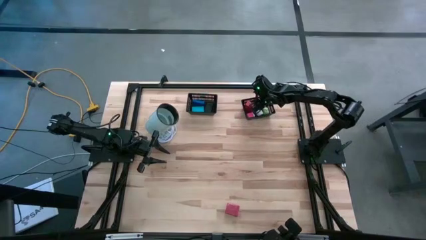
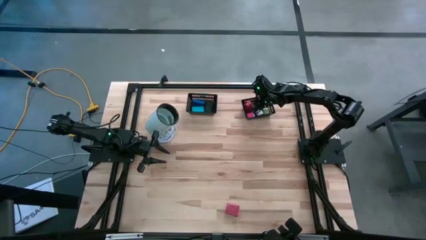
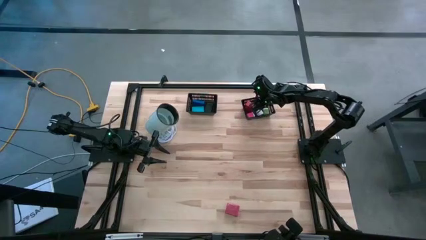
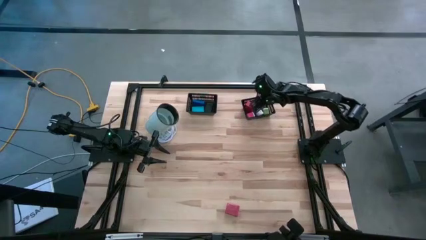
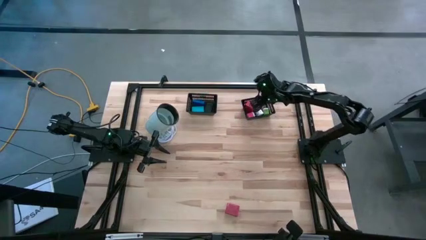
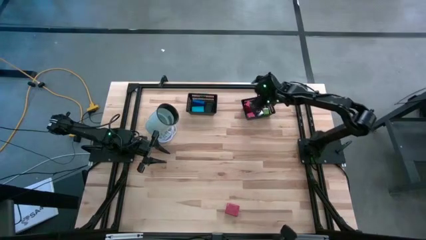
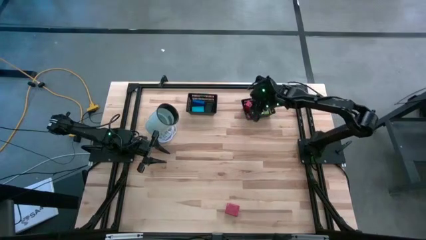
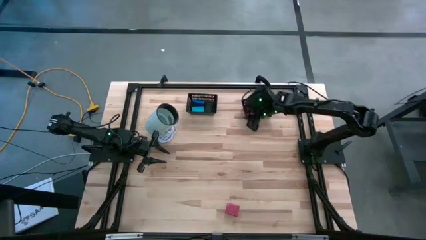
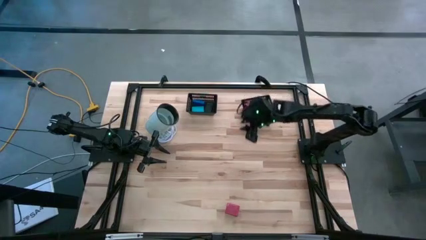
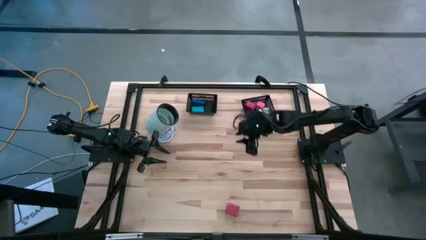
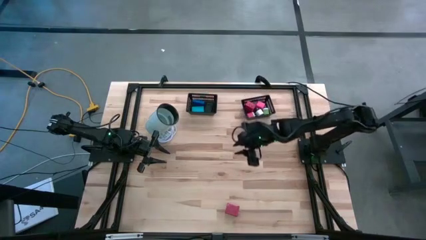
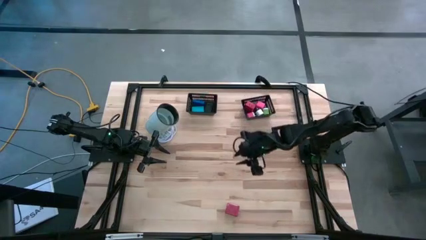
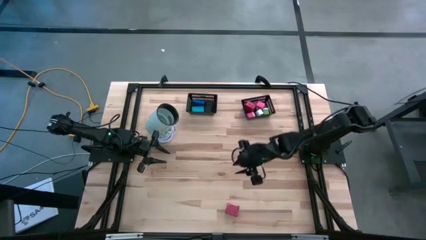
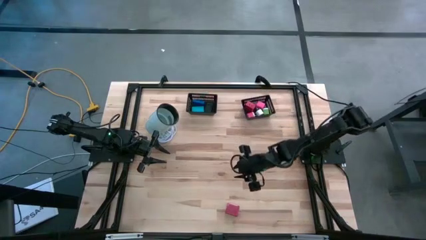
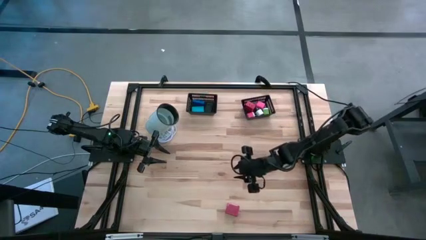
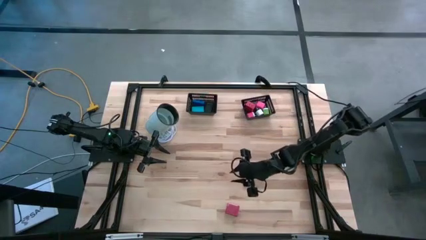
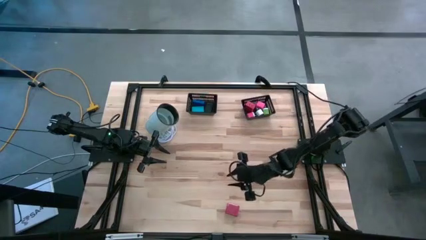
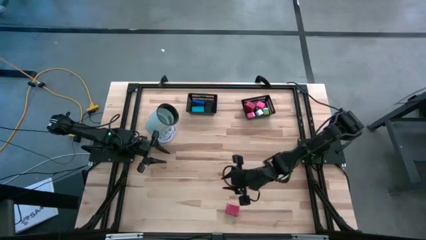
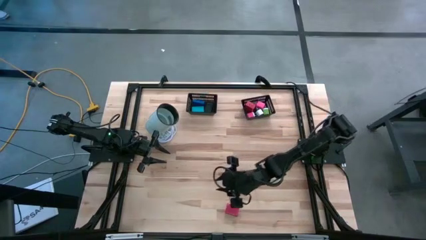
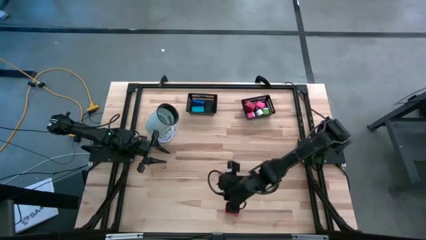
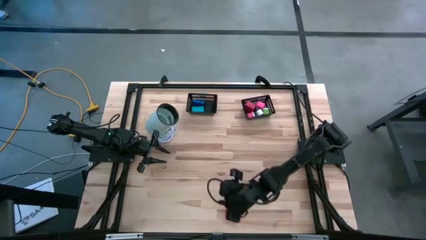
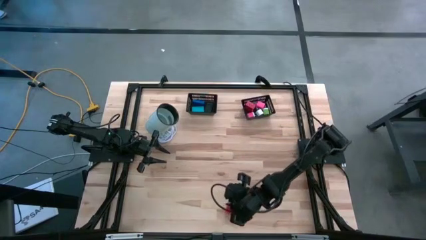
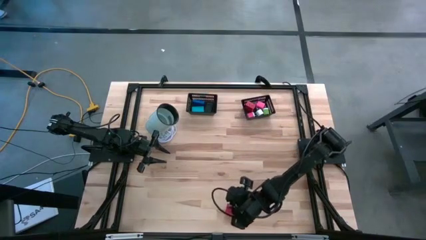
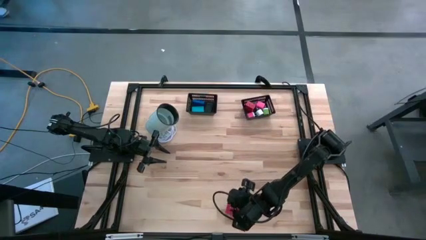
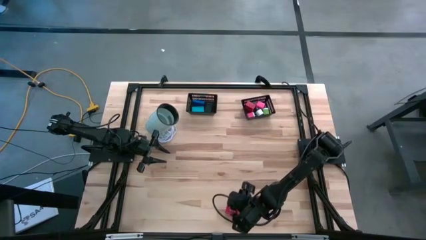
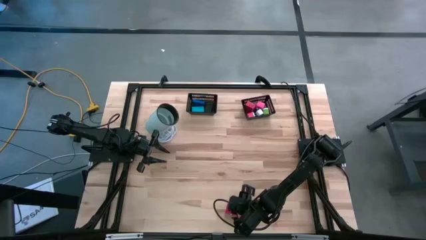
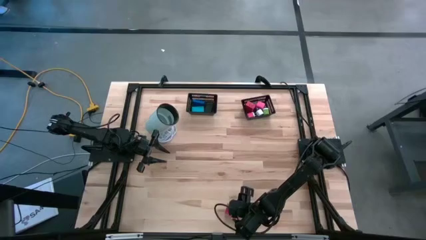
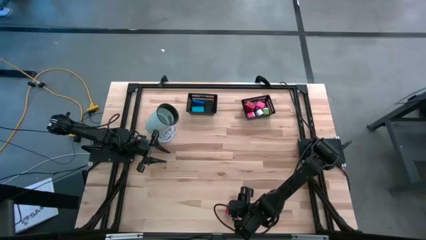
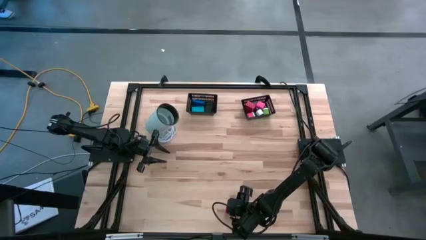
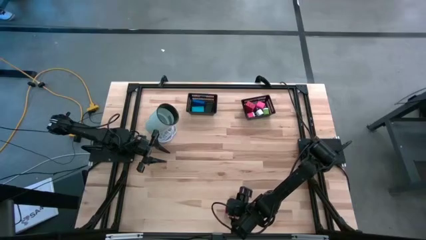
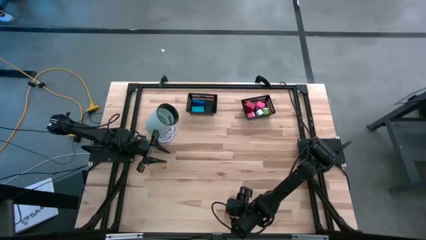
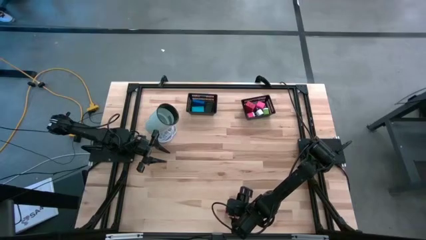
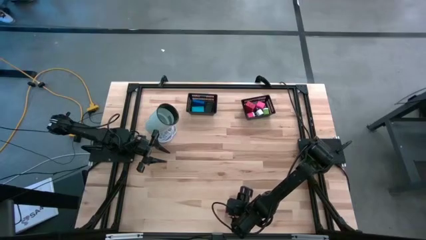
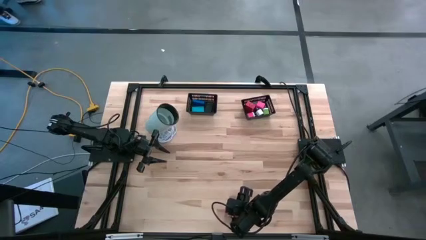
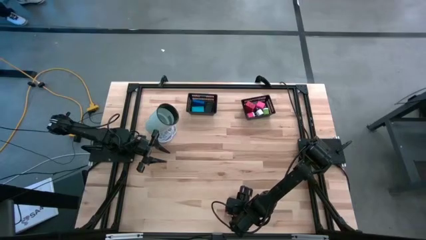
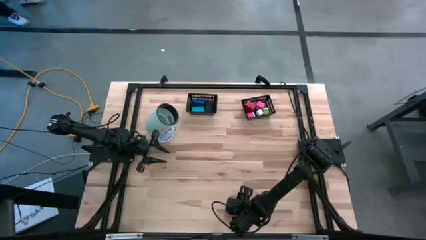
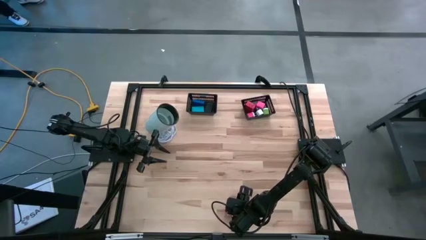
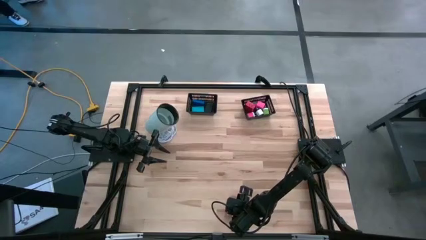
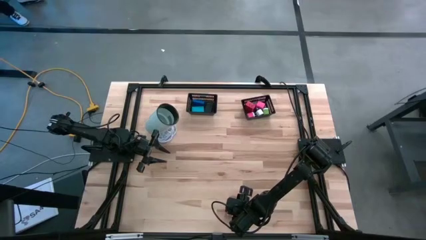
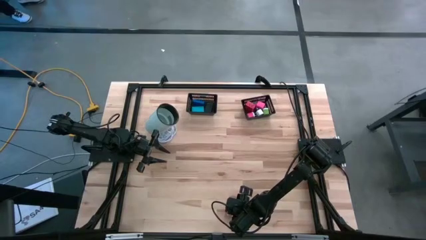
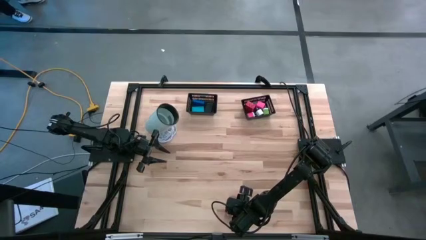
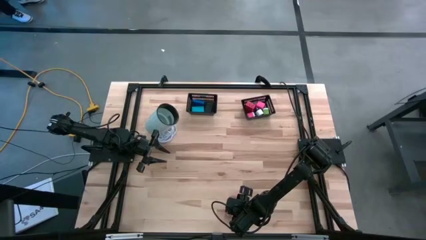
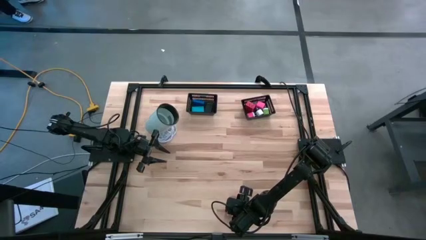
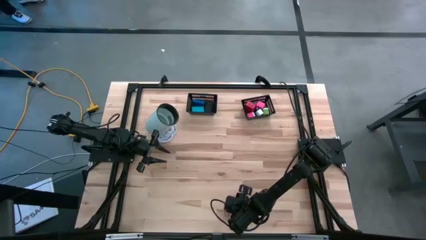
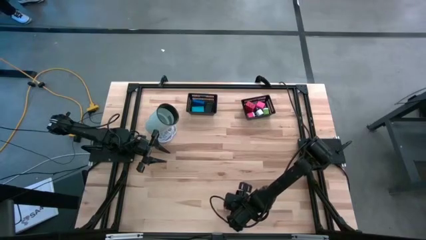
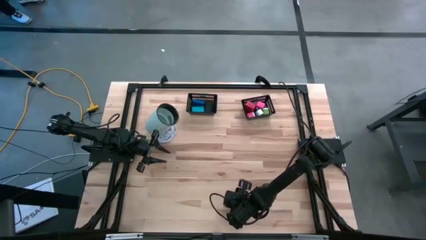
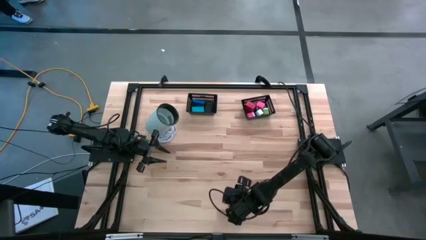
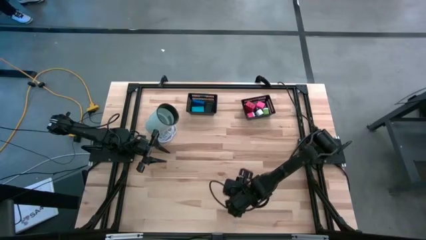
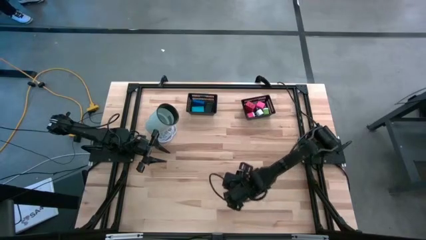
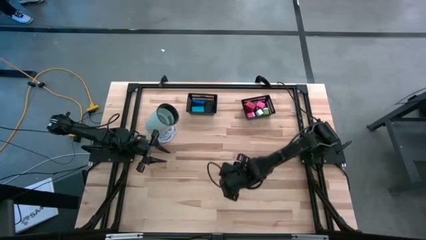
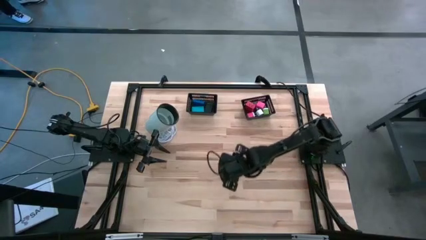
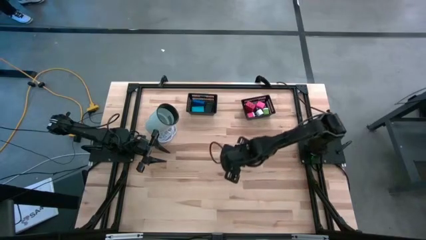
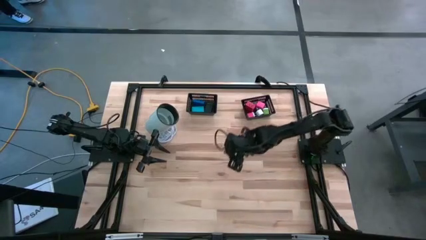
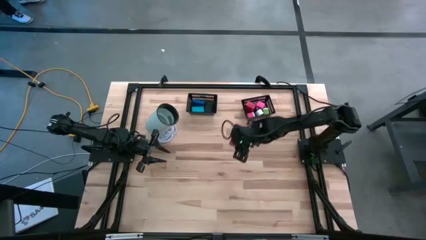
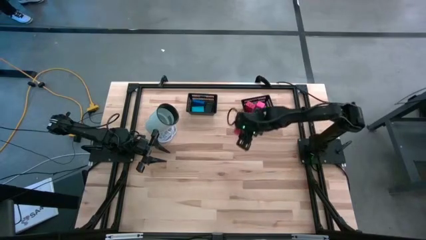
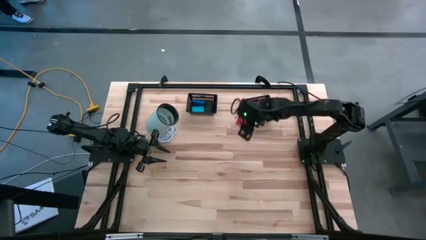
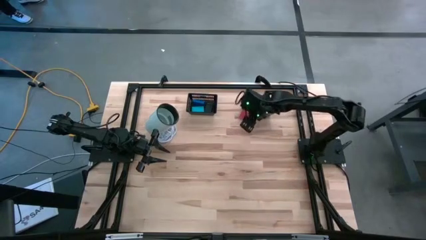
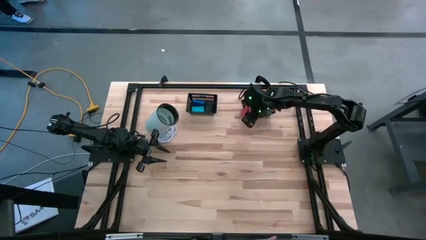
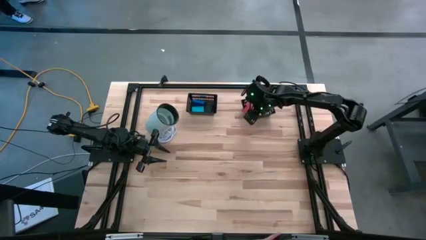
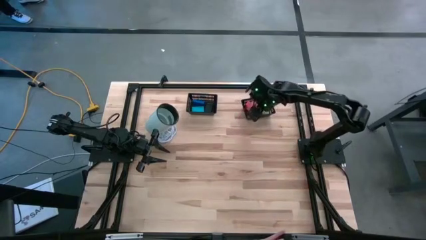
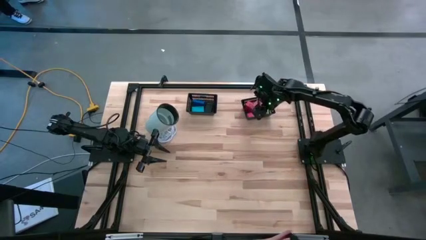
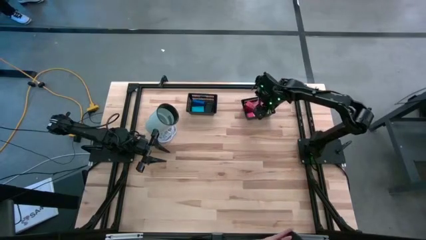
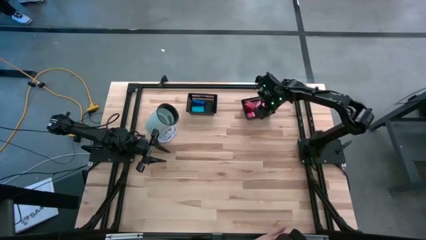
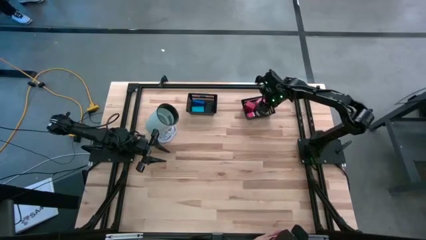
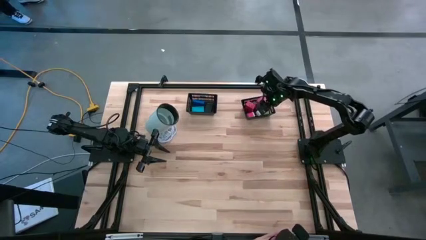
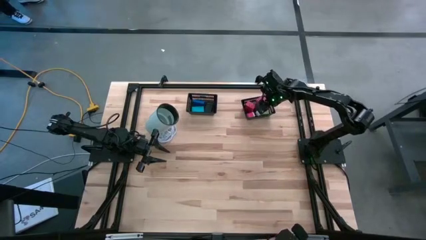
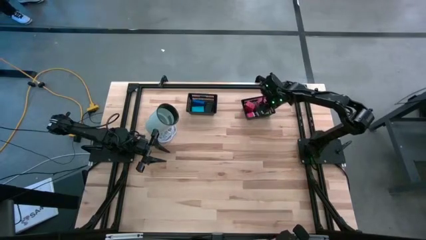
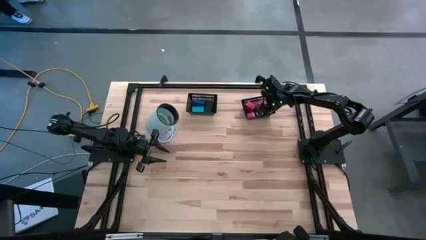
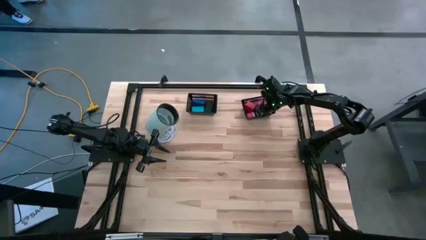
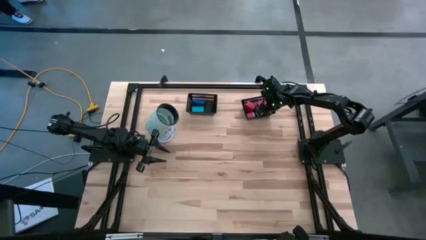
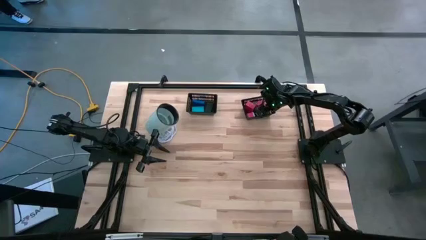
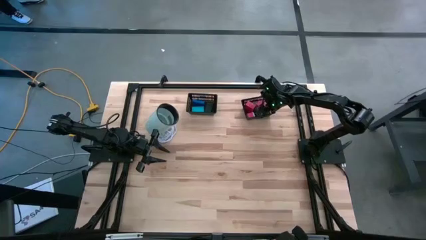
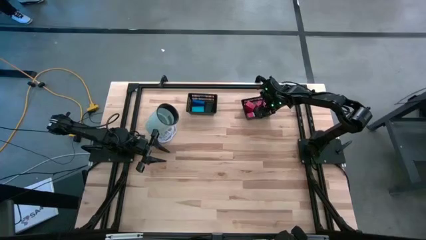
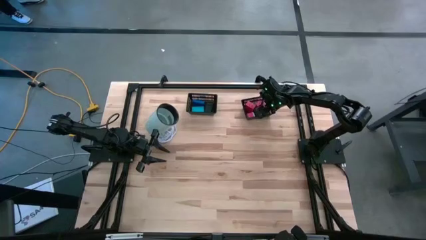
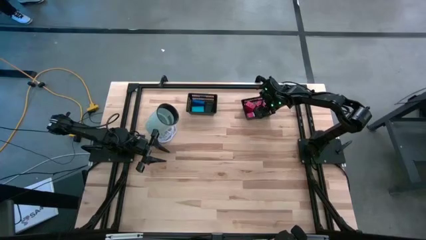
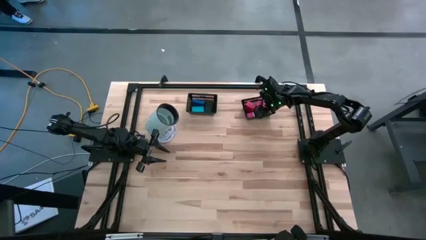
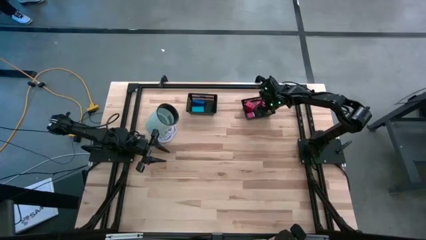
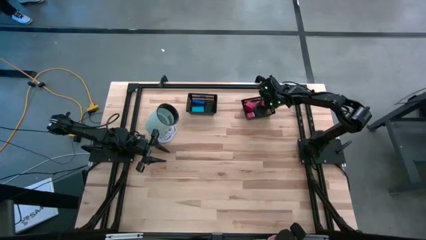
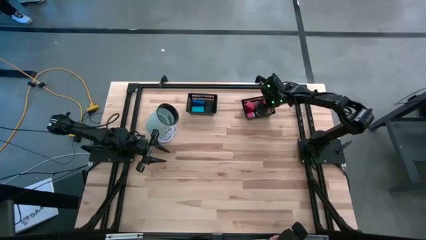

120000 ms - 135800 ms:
Task: Pick & Place Office items
Put the red charger adapter into the right black bin
